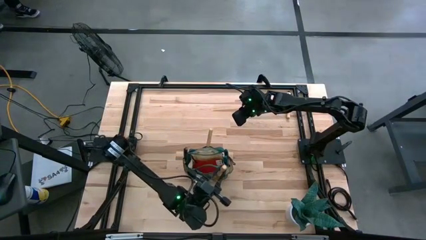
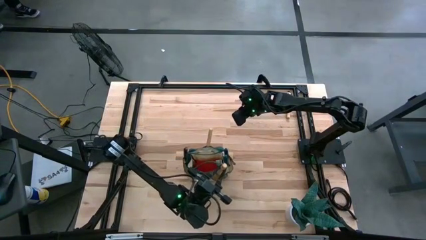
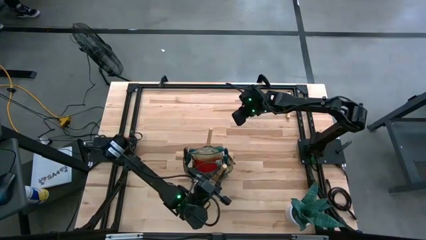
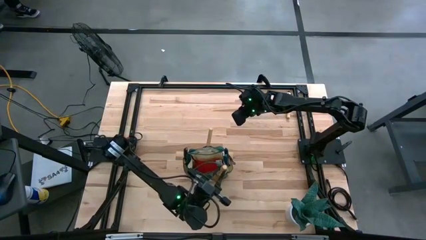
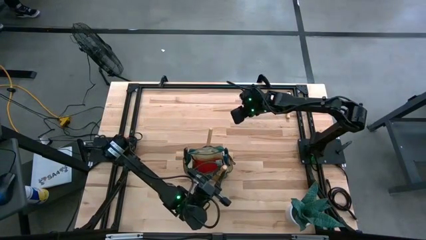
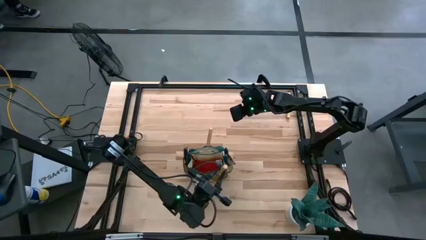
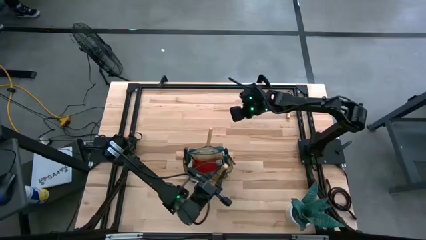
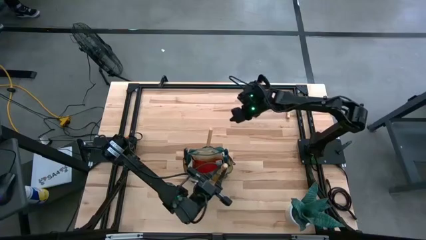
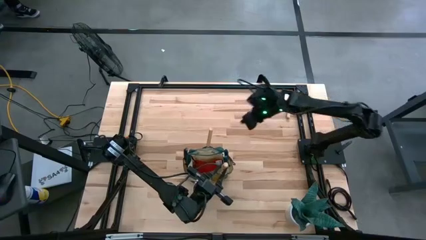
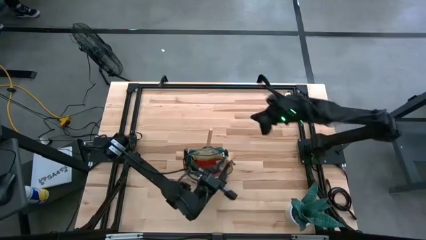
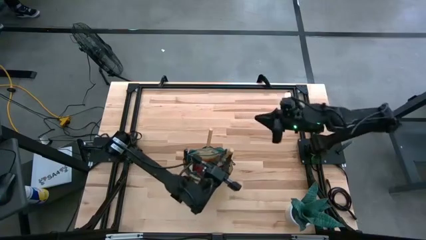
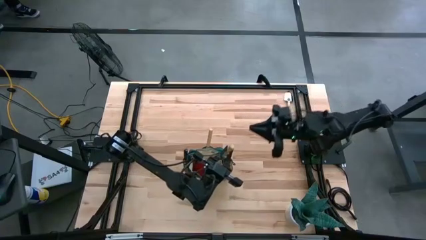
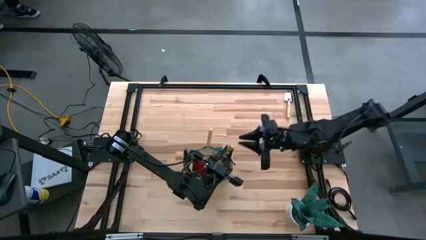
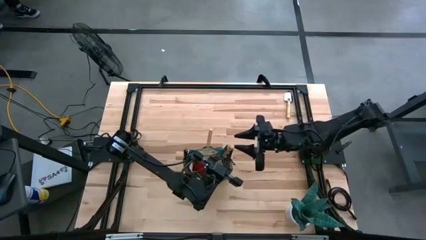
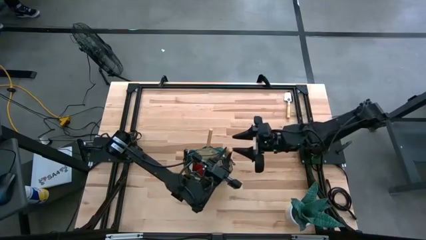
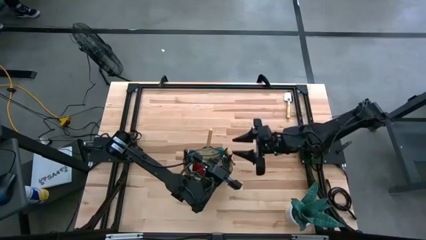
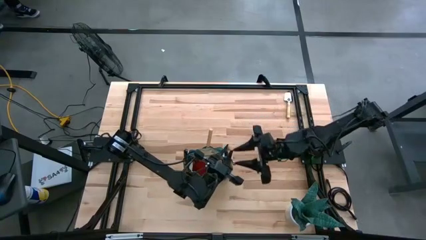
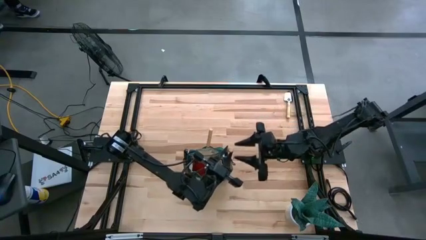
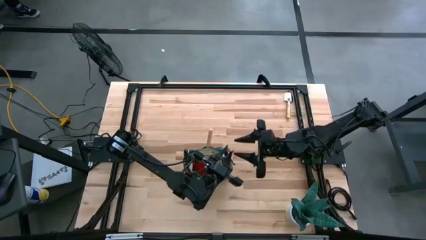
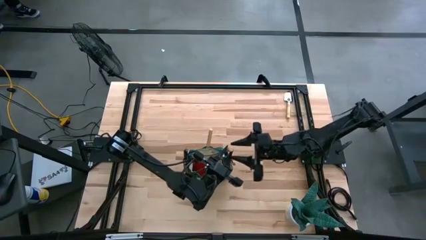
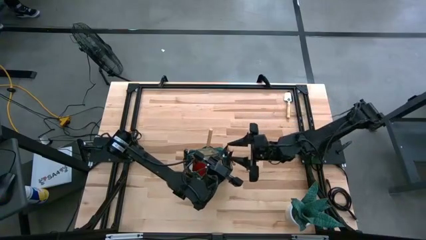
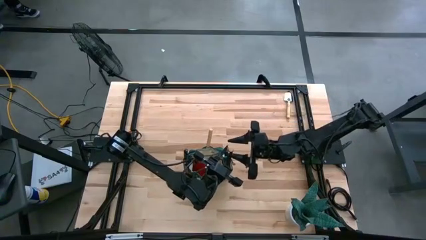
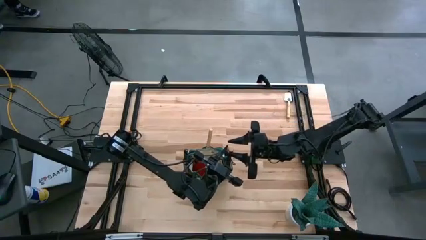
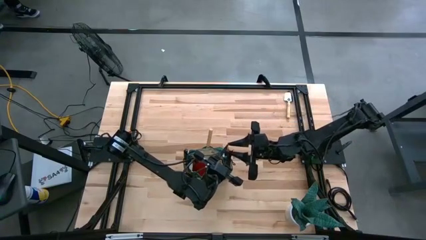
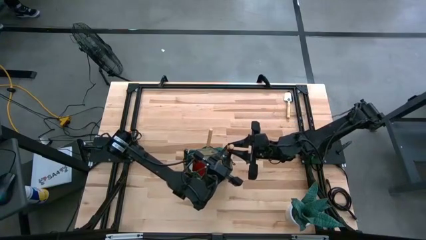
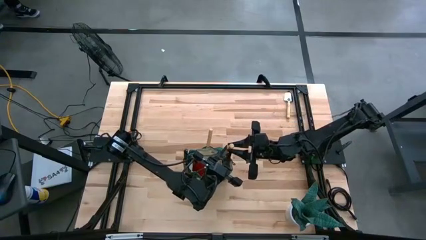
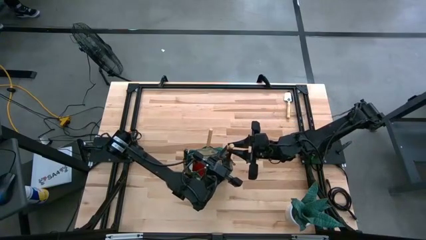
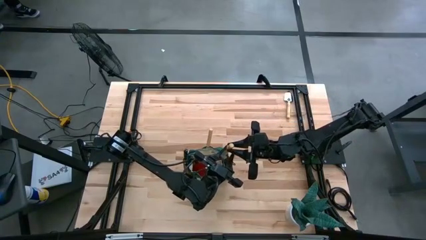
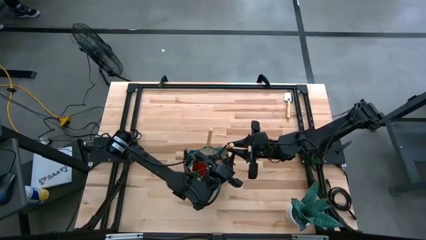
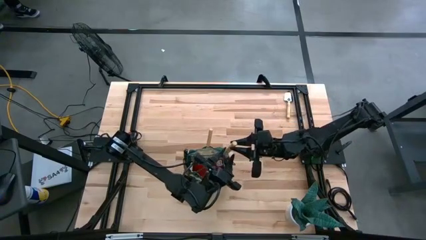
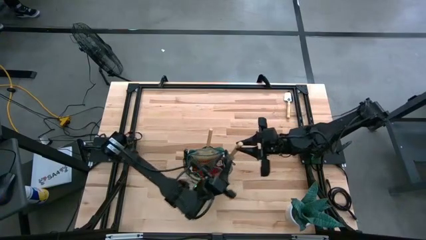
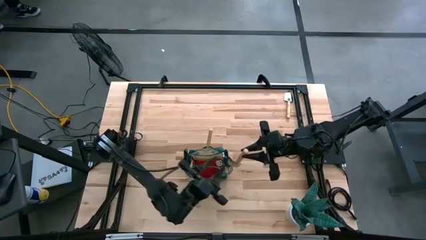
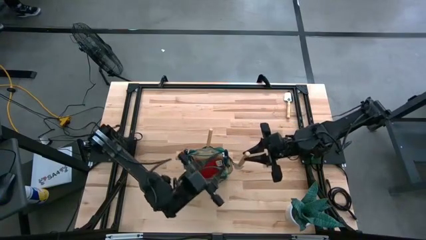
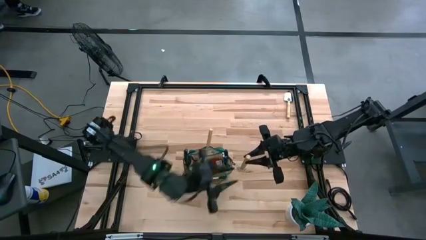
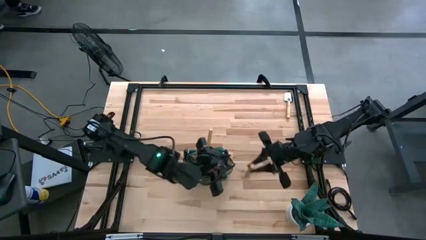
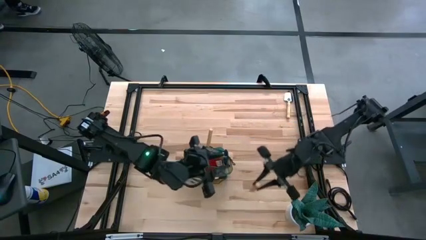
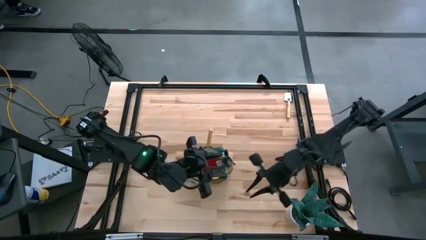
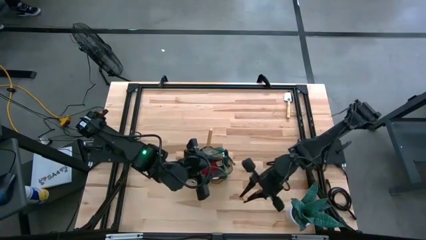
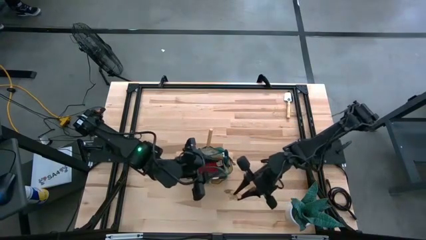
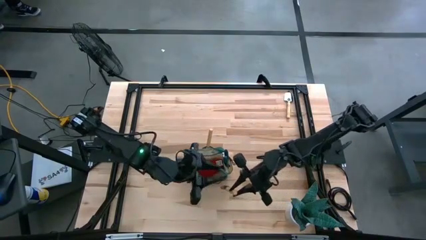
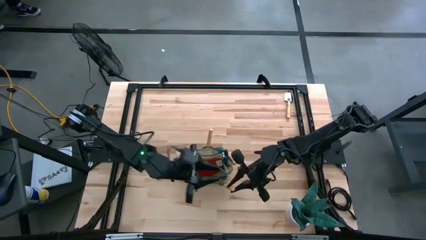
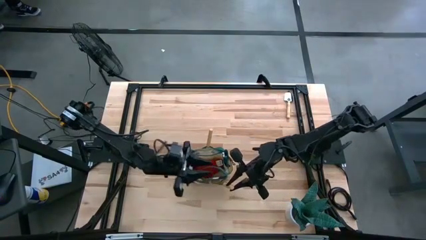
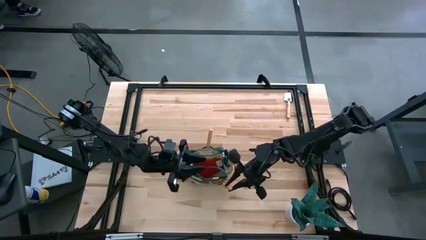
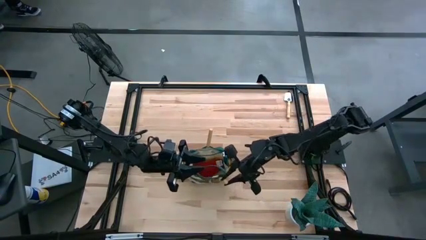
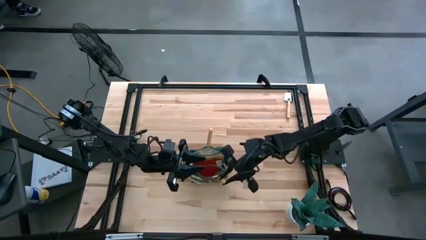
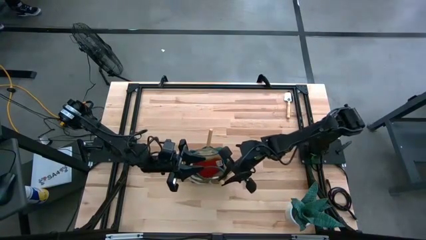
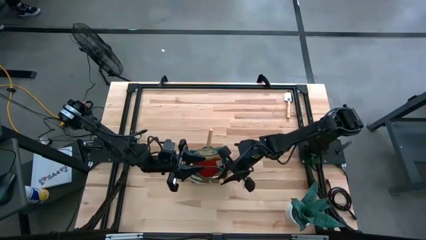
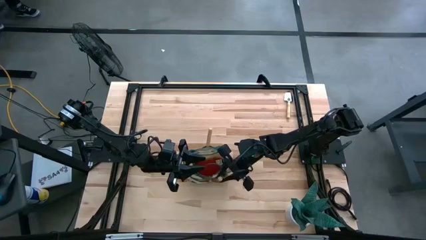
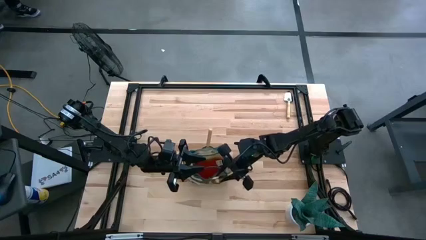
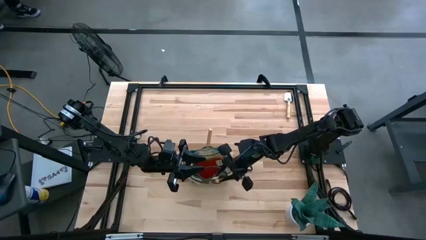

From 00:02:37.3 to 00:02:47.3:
Task: Pick & Place Garden tools in Gardening bag
Put the left light brown trowel into the white gardening bag
